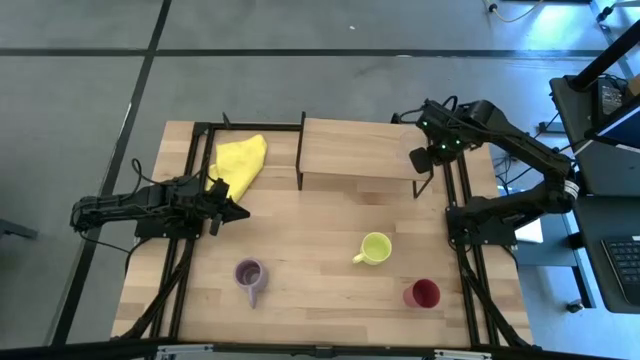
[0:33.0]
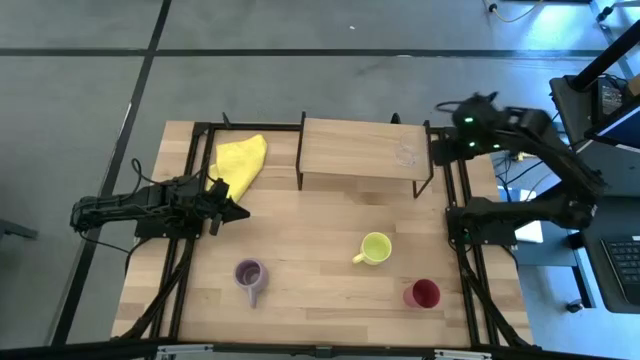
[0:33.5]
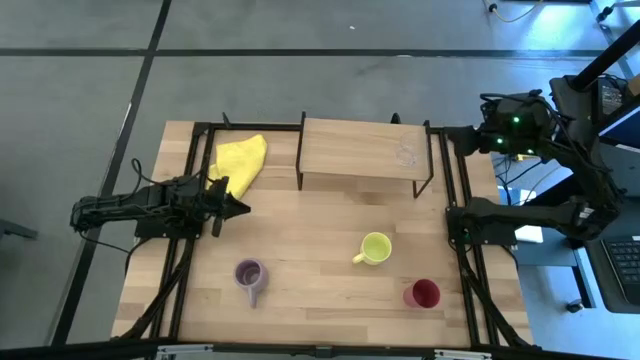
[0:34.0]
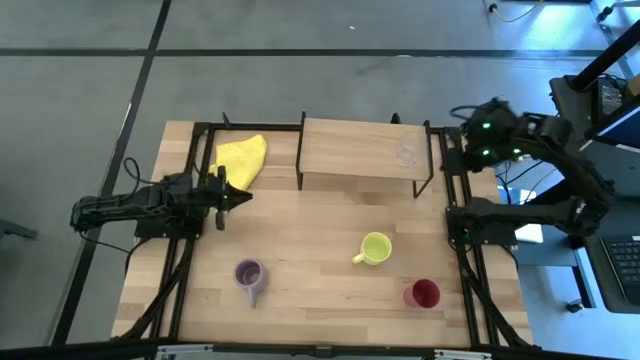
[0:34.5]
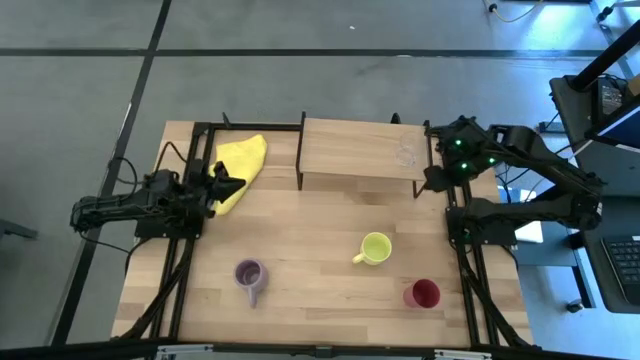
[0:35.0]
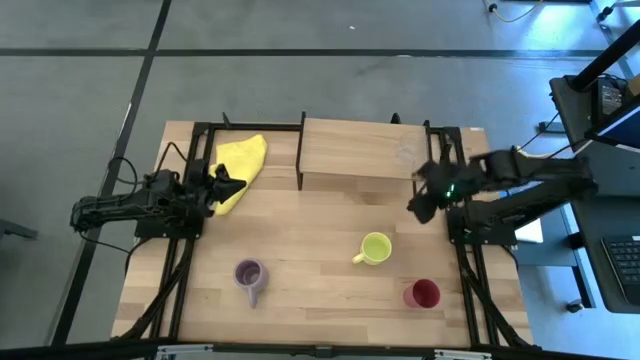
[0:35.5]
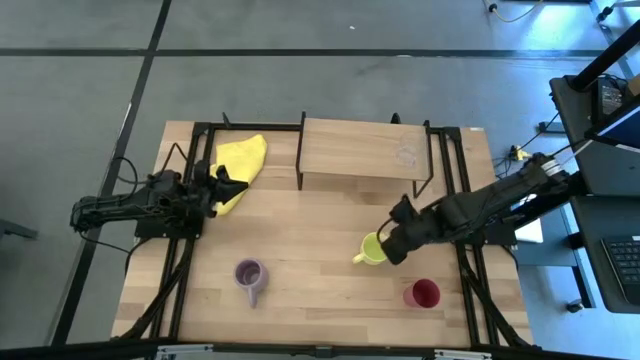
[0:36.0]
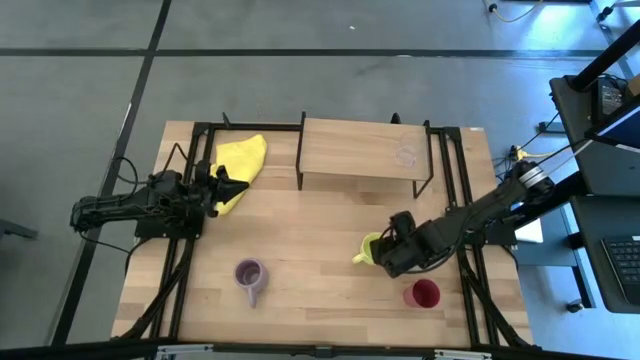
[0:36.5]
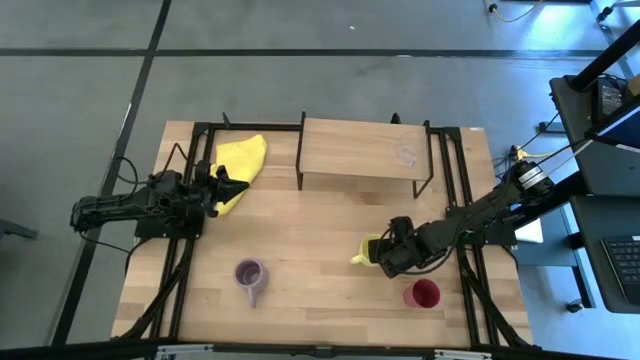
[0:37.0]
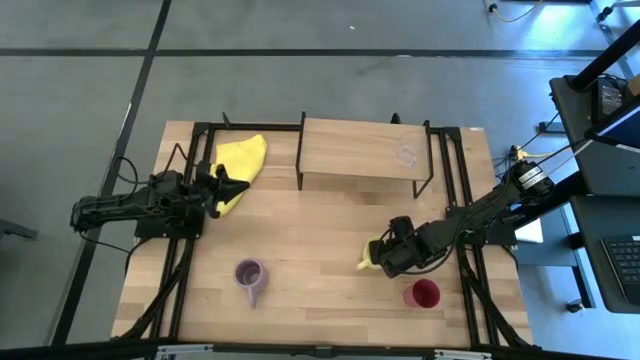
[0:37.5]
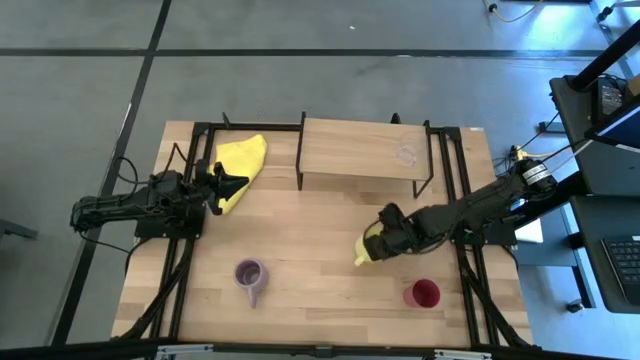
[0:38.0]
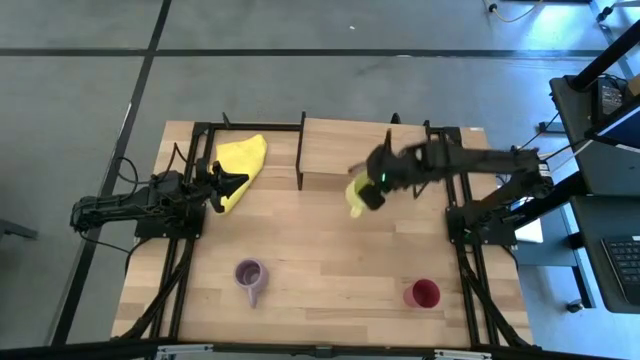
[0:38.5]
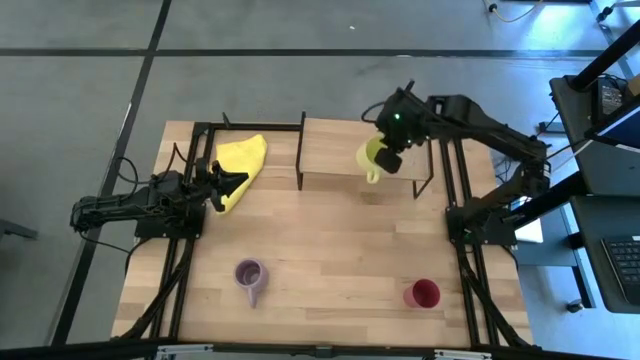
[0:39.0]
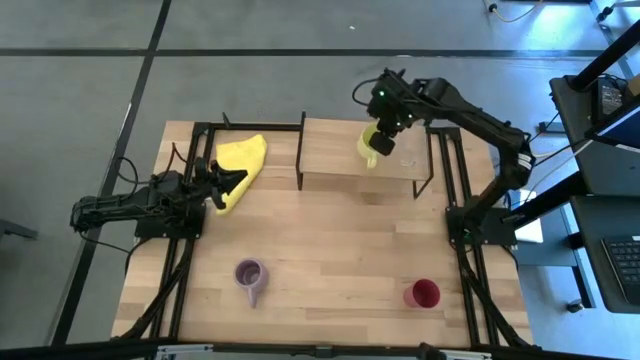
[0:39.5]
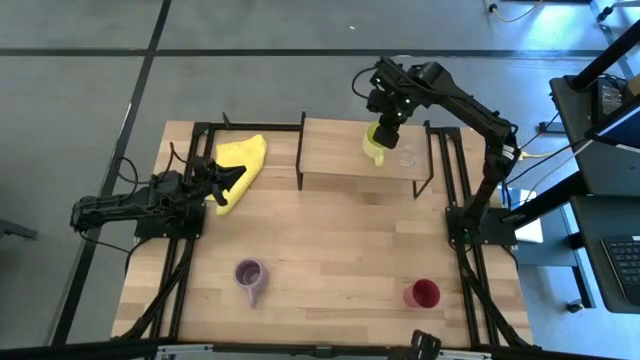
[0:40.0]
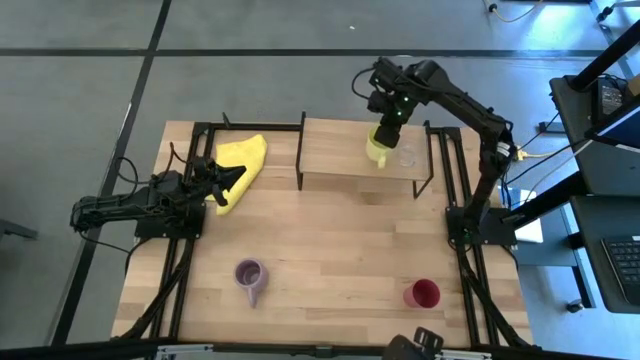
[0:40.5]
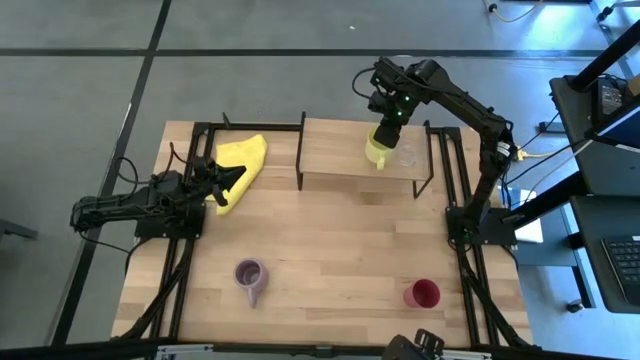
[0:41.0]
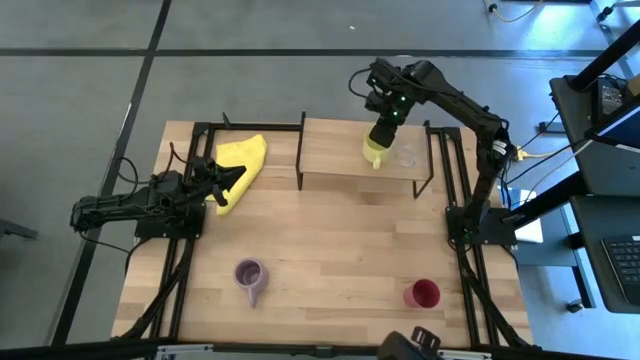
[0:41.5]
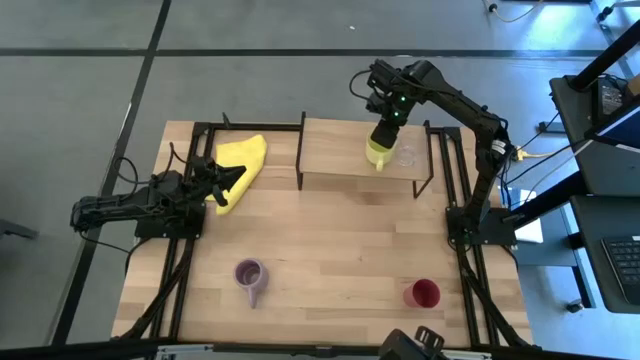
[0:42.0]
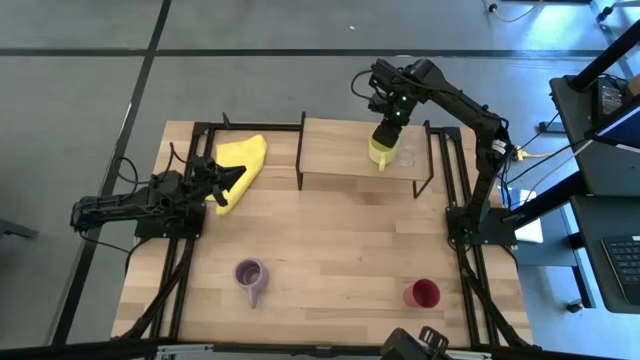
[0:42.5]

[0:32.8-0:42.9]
Task: Stack small to large cups/mugs on shelf
Put the yellow mug on the shelf

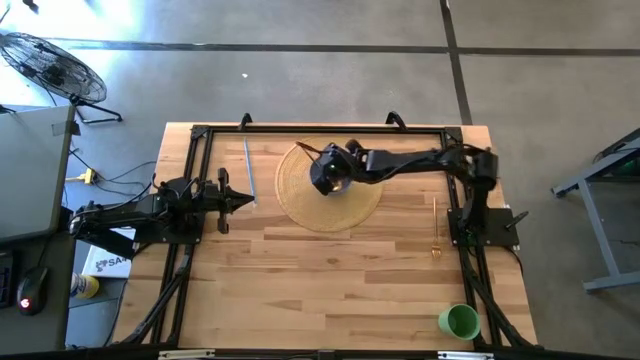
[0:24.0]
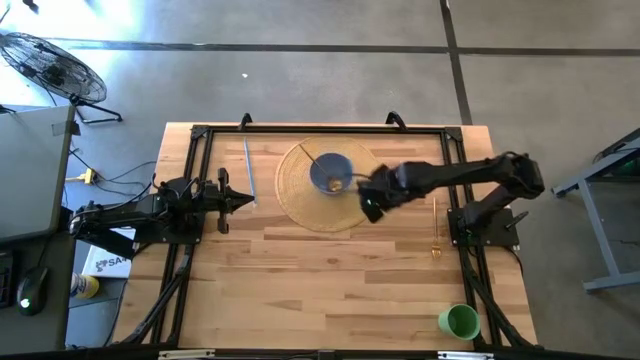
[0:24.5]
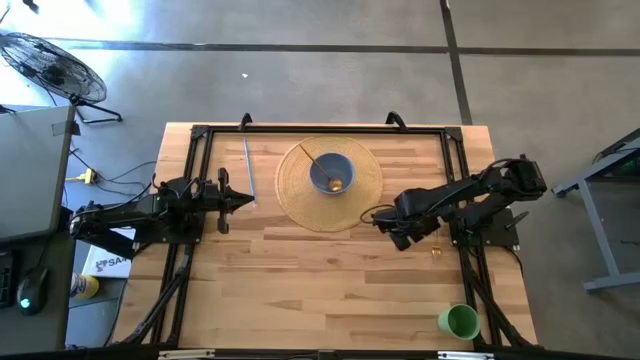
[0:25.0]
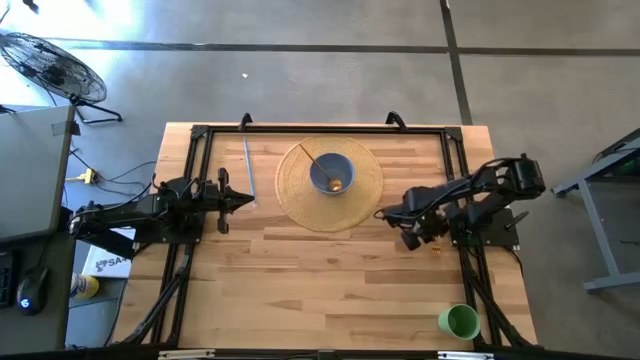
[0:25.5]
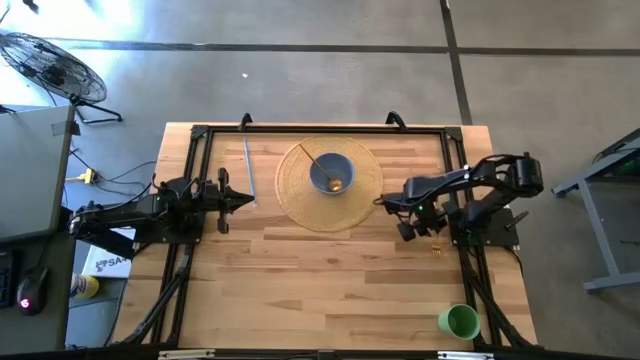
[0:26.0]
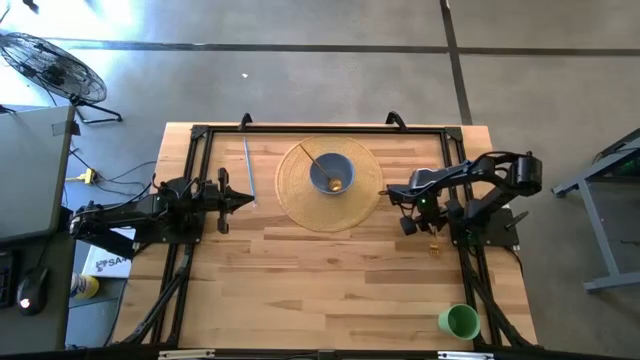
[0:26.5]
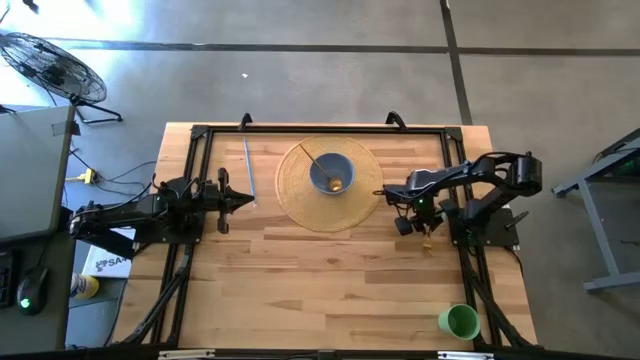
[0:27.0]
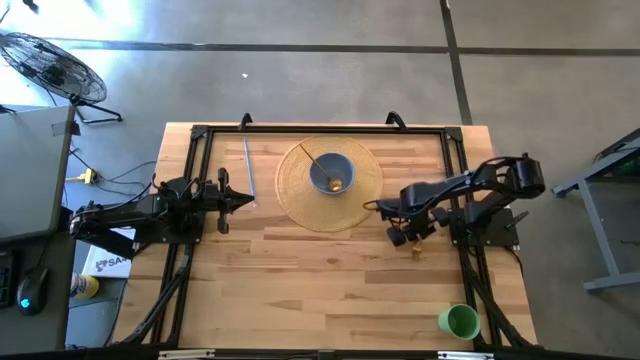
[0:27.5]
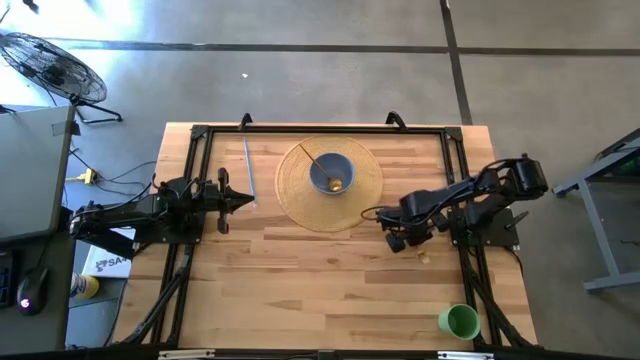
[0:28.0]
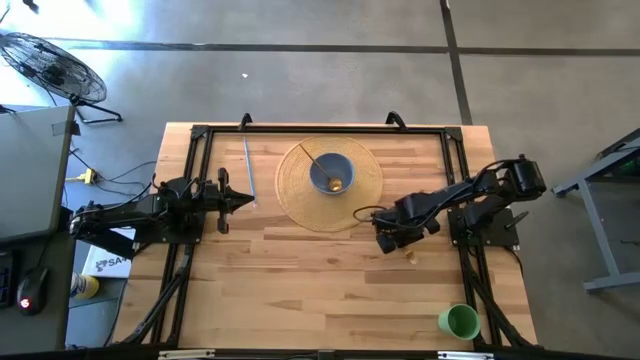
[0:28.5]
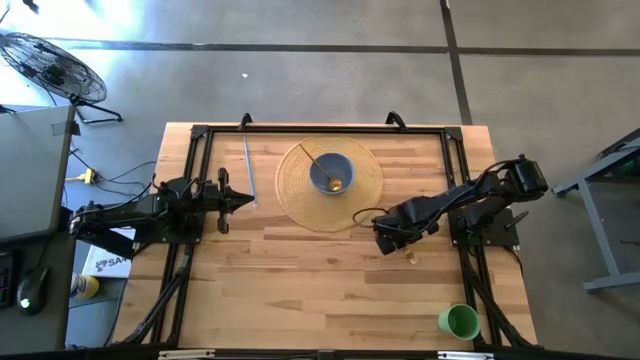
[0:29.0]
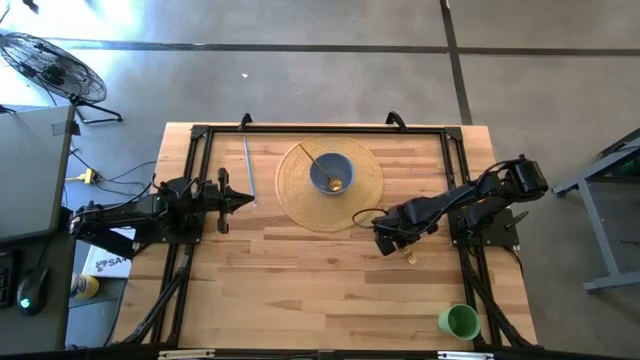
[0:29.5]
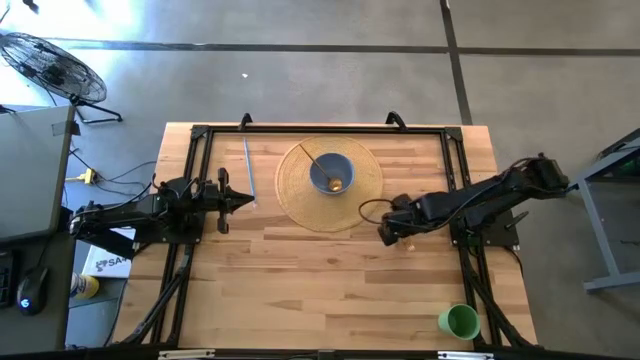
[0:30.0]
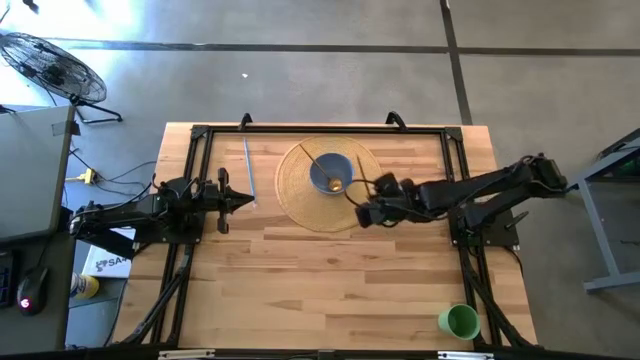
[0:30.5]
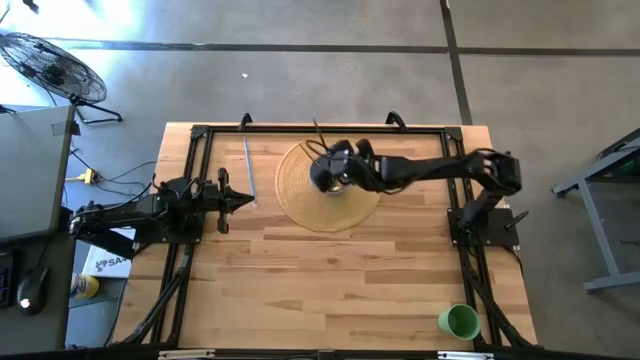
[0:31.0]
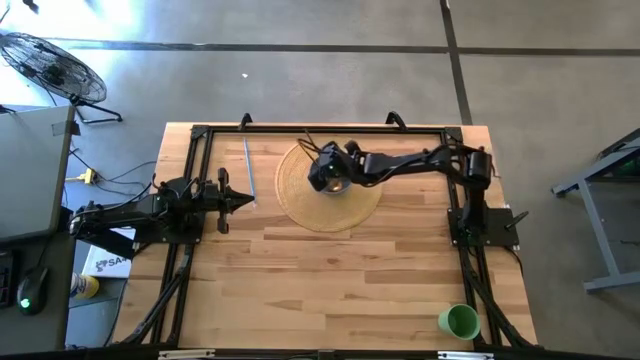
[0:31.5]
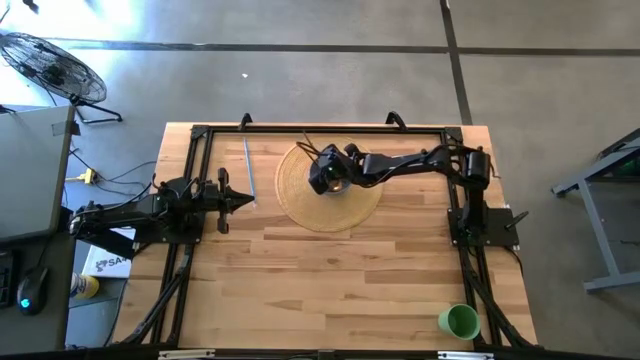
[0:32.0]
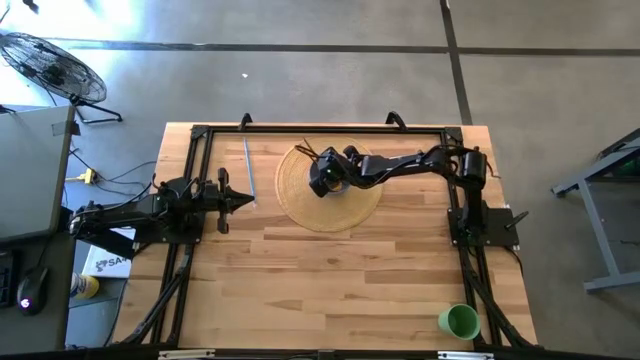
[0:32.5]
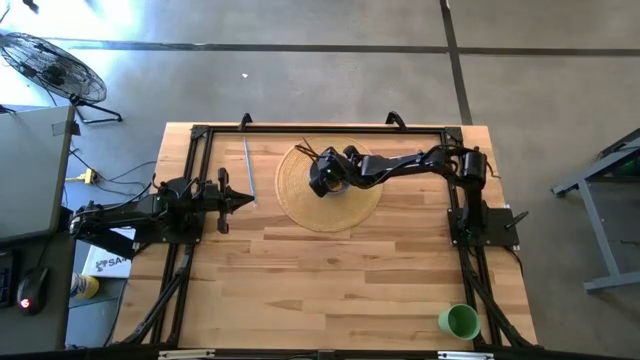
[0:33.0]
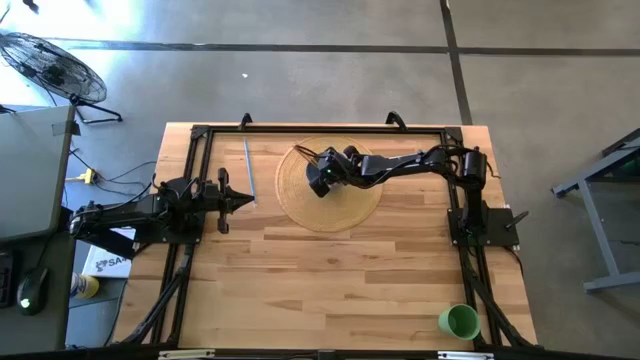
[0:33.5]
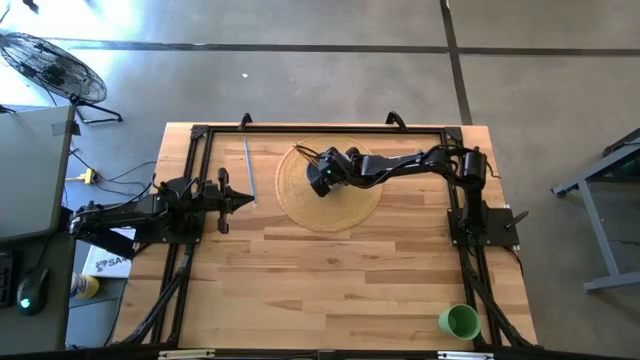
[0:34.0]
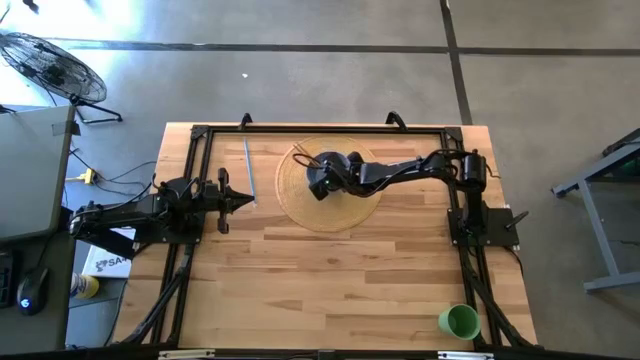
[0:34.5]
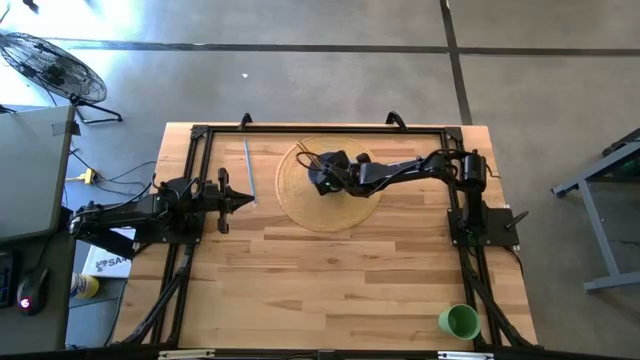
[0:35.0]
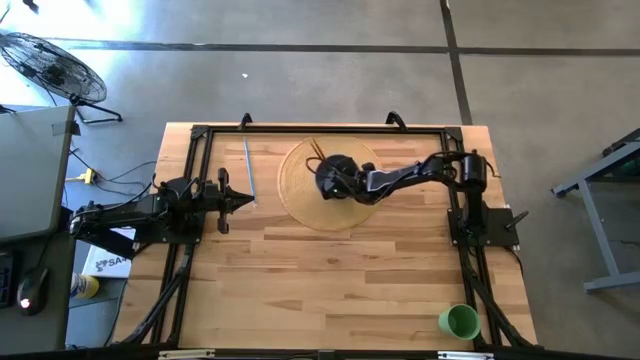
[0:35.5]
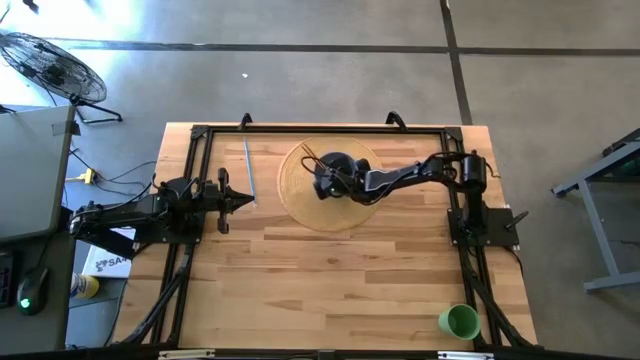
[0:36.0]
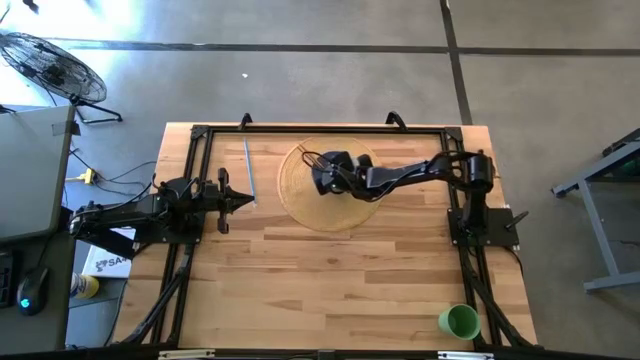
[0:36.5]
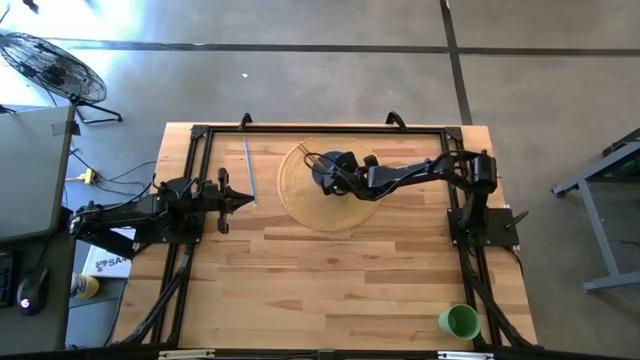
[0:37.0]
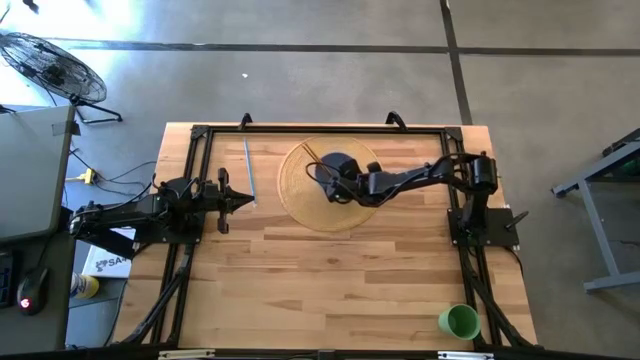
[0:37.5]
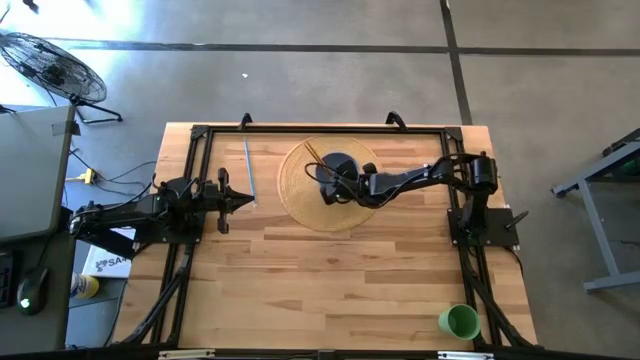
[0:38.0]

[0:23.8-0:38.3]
Task: Pick & Place Utensil
Put the gold fork into the blue bowl on the brown mat
